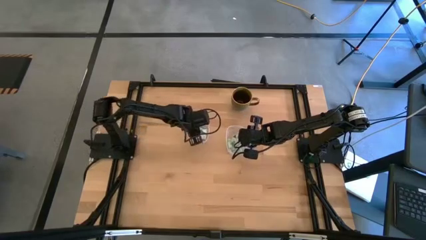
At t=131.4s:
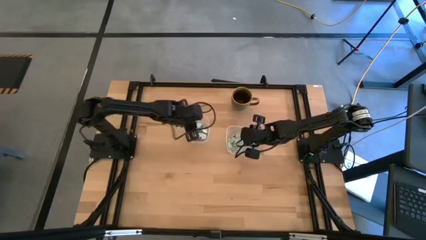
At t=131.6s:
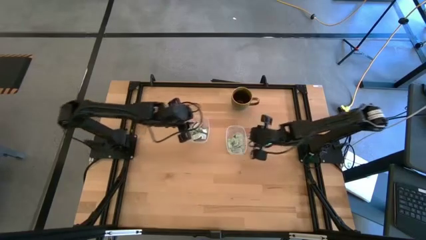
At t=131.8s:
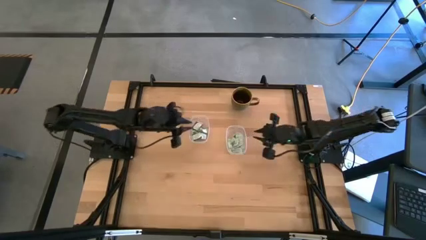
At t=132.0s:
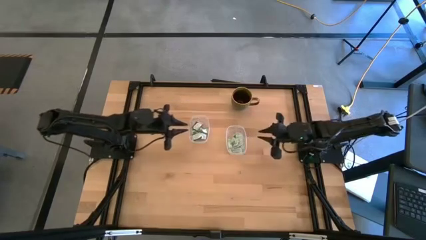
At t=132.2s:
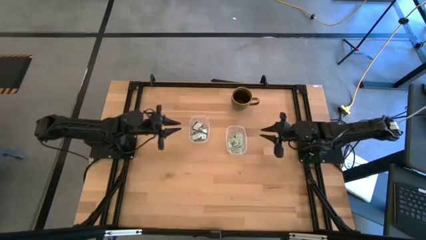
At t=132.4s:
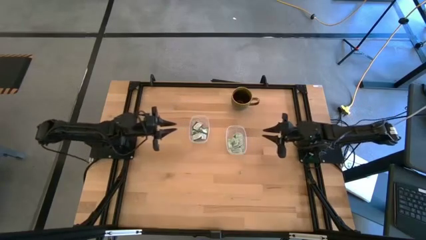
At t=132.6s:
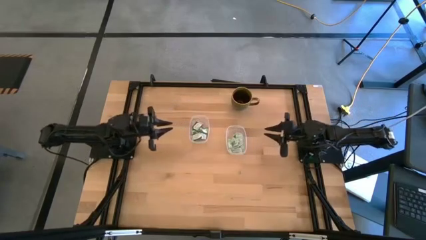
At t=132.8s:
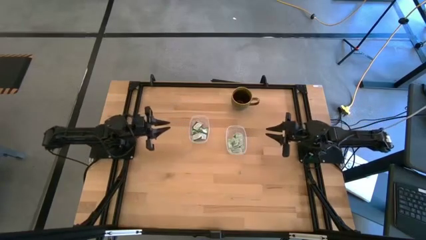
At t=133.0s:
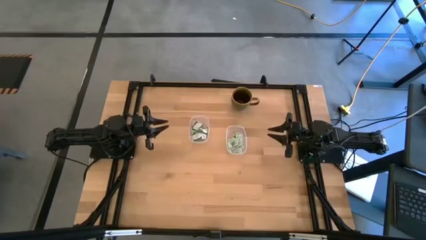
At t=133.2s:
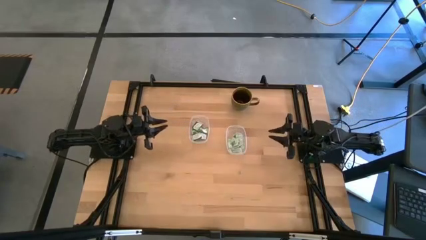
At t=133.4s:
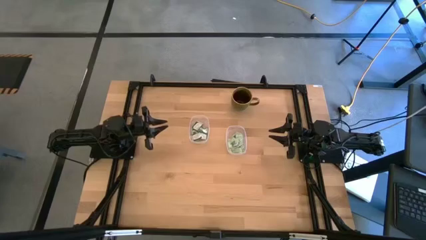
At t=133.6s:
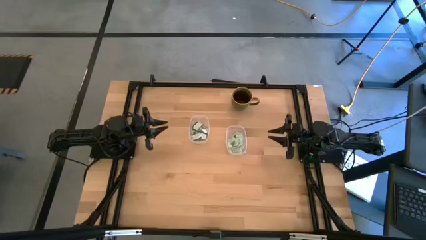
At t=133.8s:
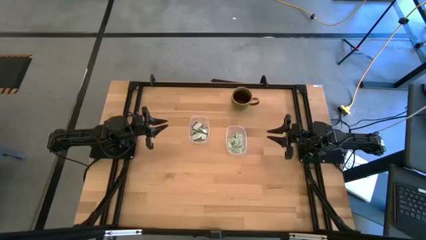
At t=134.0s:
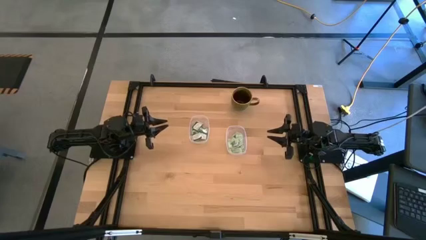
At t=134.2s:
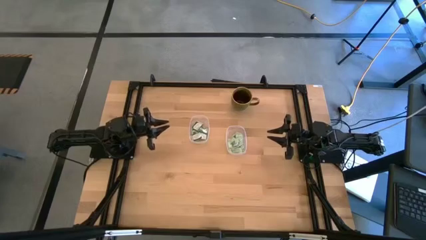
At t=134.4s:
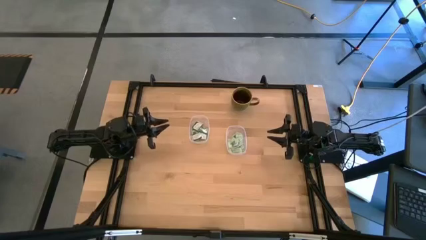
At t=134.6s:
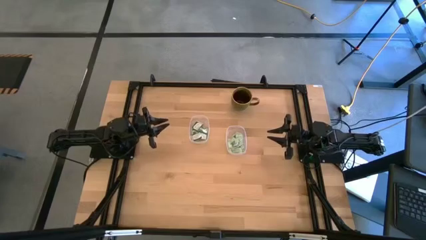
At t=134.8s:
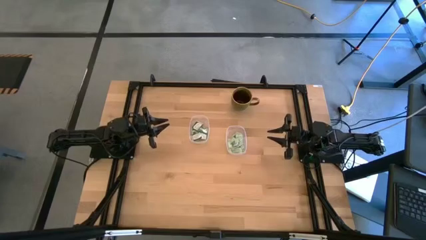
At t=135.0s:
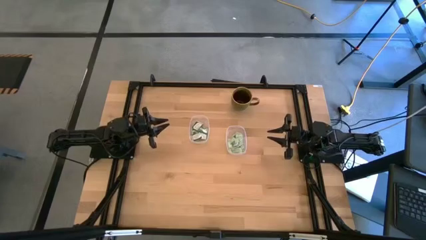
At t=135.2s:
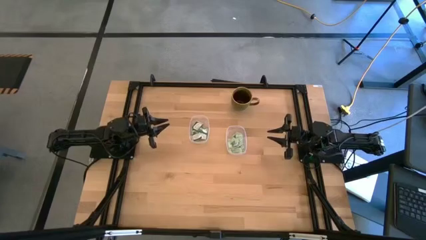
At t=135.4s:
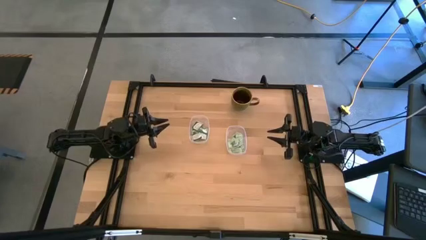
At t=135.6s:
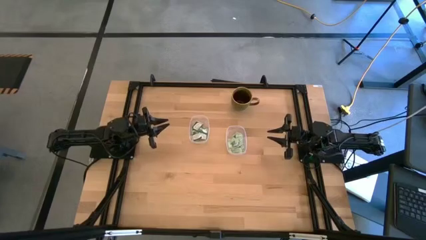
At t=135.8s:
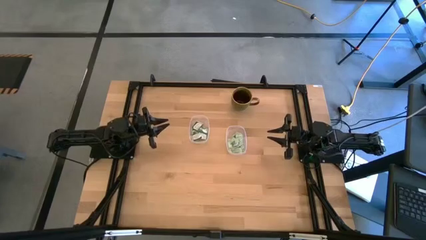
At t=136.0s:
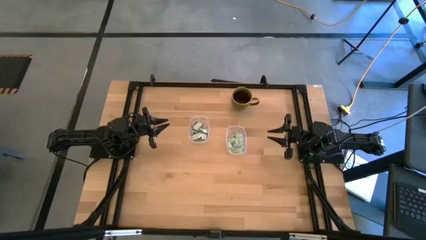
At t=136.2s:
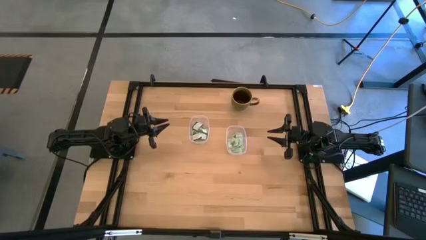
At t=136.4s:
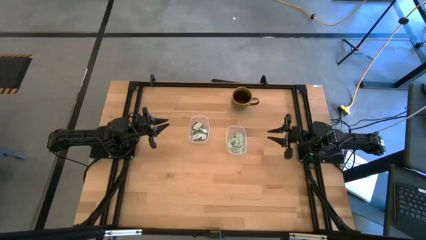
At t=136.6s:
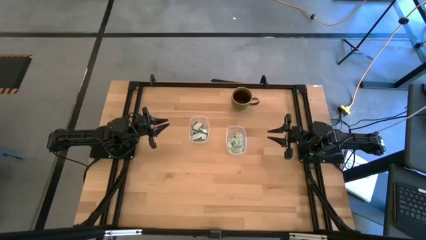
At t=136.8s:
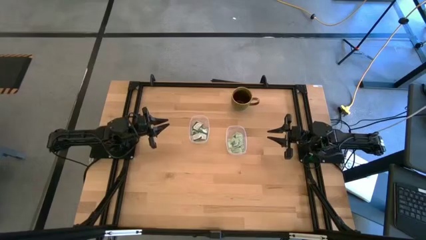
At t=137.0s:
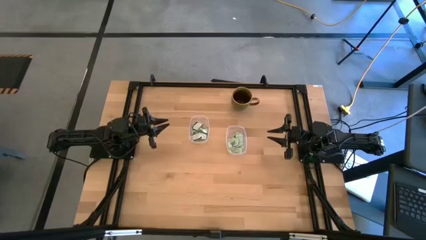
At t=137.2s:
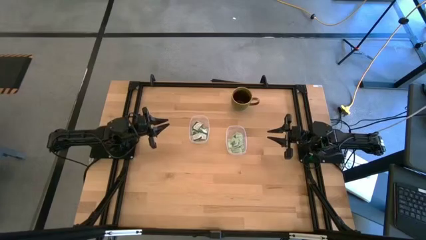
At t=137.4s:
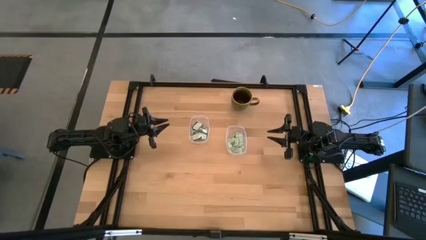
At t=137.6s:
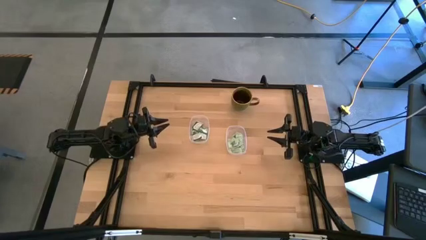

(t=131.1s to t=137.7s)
Task: Pick and place items into bin
Return to Home Position

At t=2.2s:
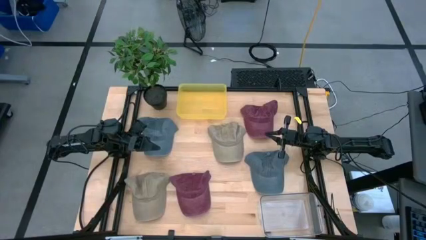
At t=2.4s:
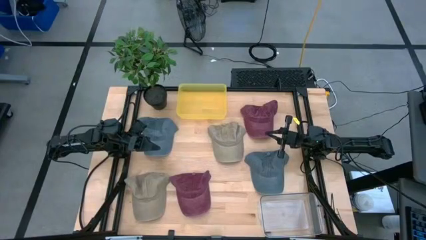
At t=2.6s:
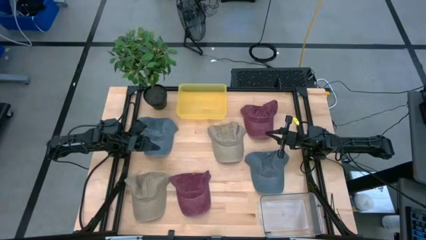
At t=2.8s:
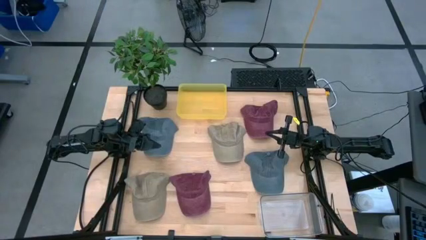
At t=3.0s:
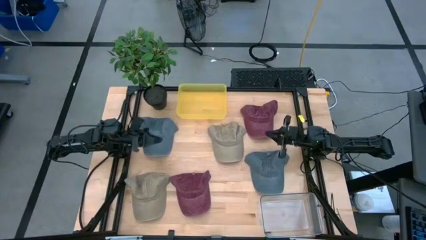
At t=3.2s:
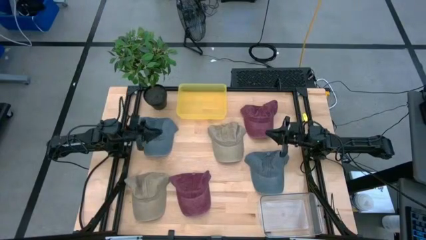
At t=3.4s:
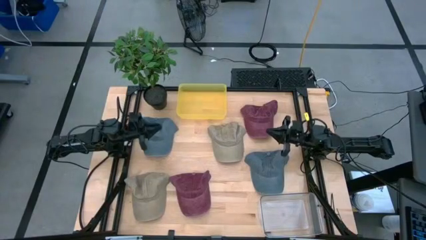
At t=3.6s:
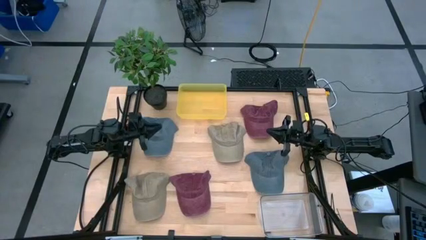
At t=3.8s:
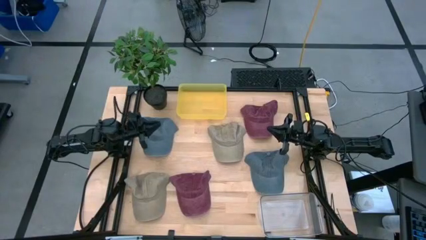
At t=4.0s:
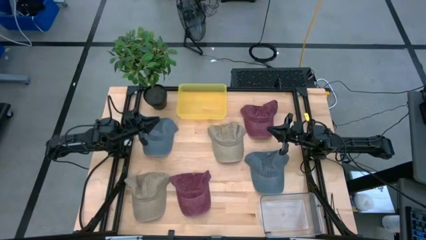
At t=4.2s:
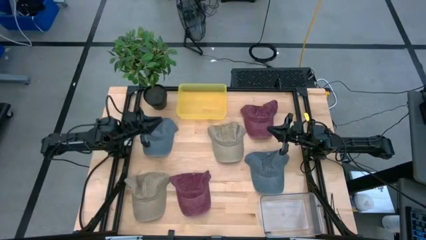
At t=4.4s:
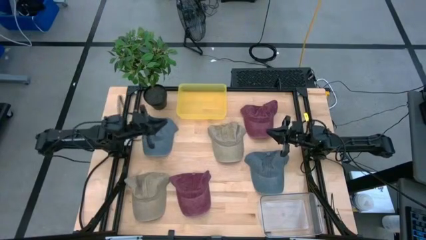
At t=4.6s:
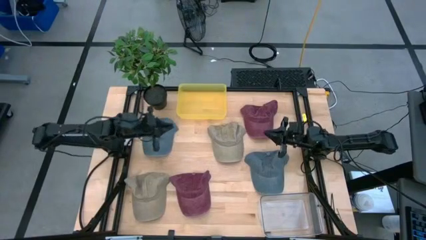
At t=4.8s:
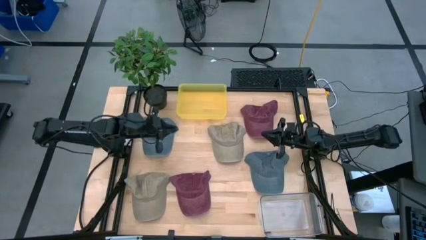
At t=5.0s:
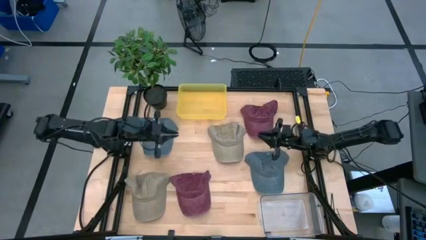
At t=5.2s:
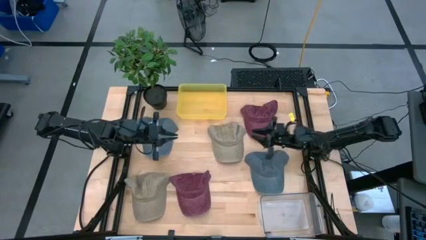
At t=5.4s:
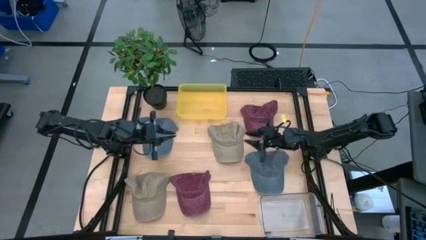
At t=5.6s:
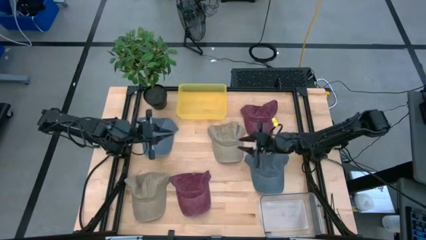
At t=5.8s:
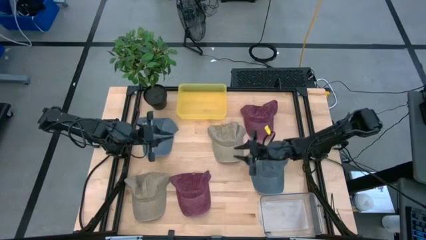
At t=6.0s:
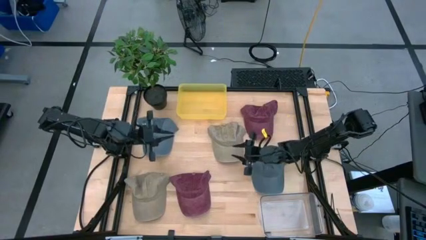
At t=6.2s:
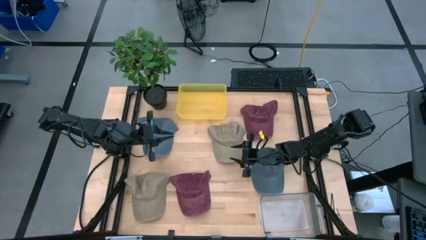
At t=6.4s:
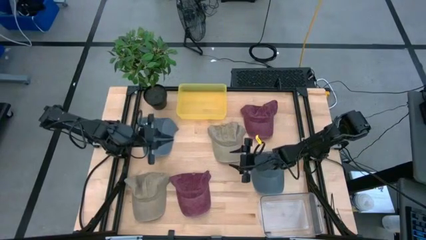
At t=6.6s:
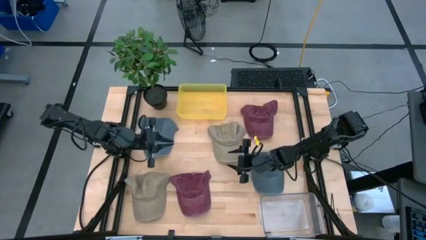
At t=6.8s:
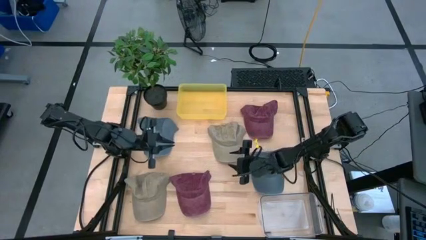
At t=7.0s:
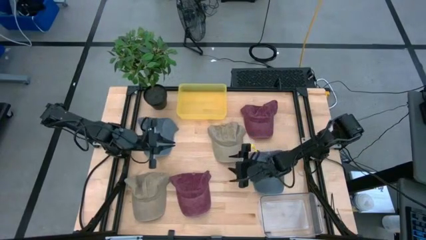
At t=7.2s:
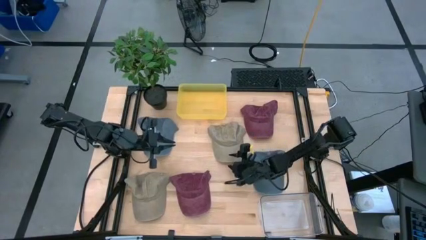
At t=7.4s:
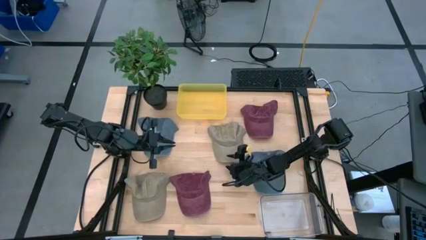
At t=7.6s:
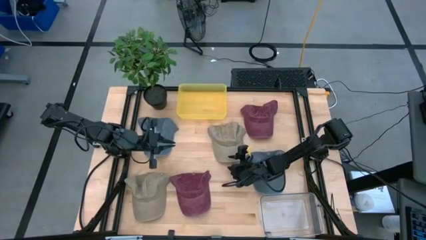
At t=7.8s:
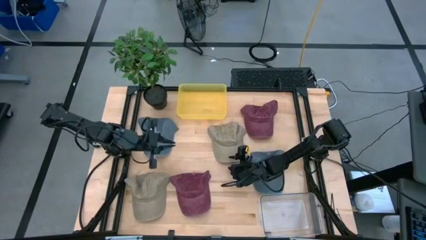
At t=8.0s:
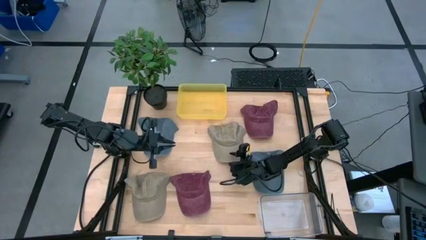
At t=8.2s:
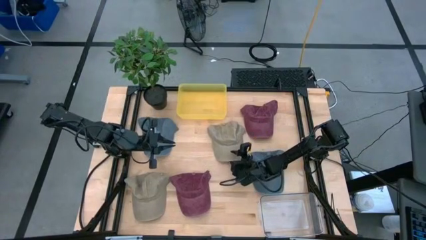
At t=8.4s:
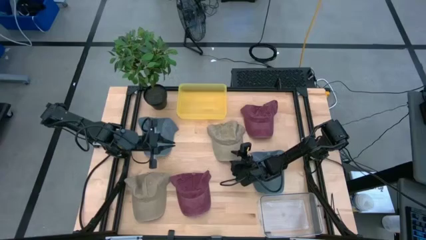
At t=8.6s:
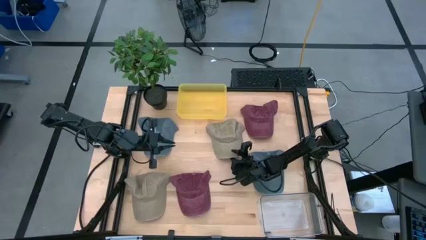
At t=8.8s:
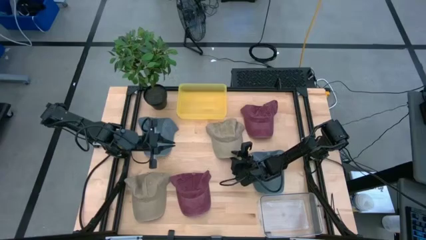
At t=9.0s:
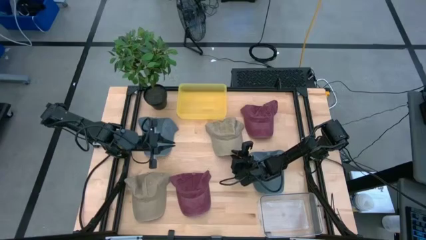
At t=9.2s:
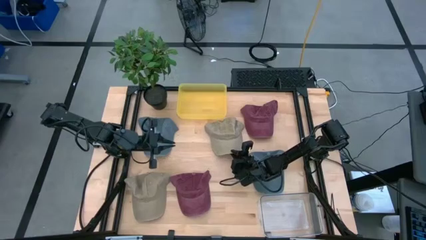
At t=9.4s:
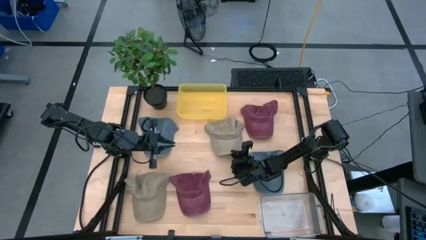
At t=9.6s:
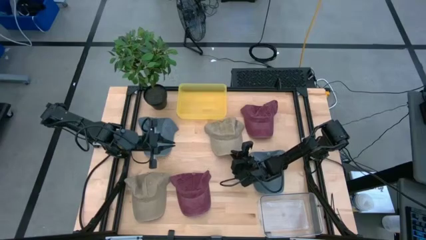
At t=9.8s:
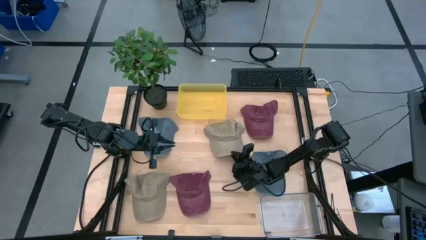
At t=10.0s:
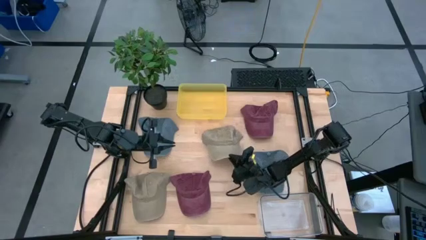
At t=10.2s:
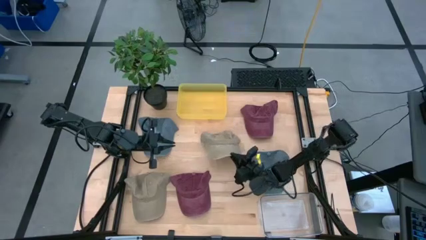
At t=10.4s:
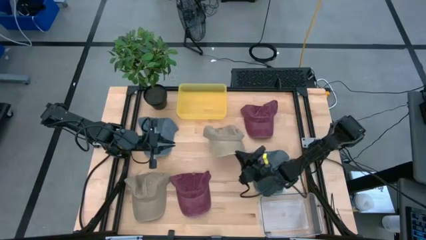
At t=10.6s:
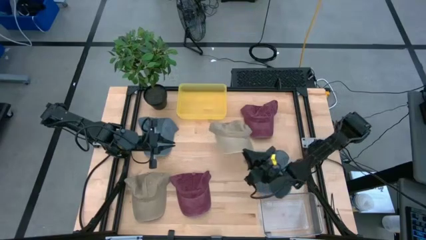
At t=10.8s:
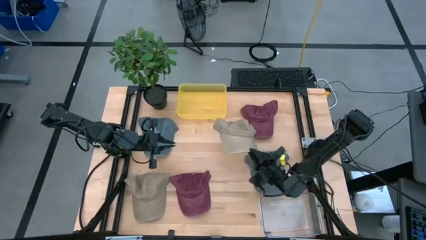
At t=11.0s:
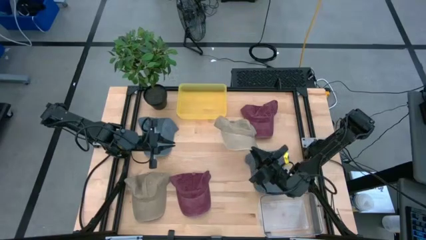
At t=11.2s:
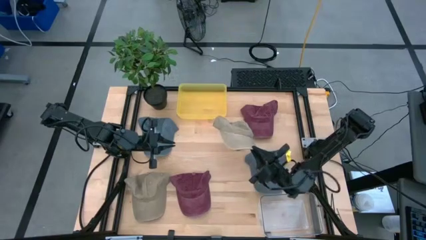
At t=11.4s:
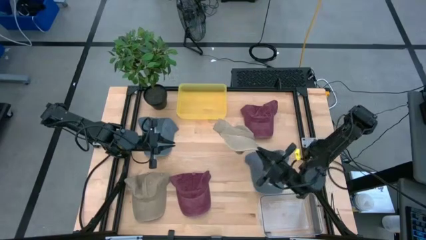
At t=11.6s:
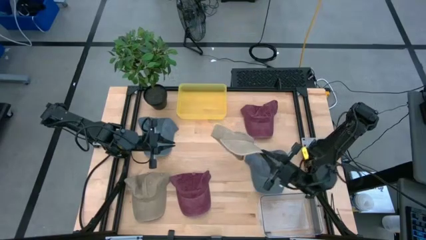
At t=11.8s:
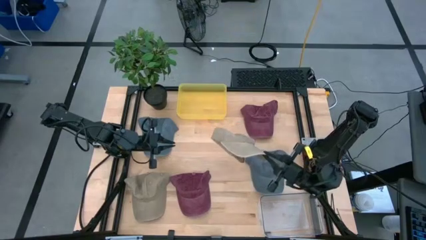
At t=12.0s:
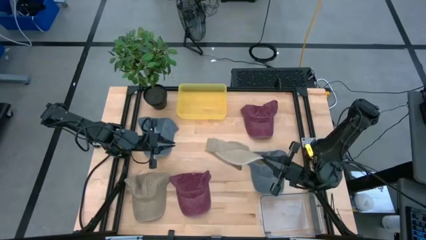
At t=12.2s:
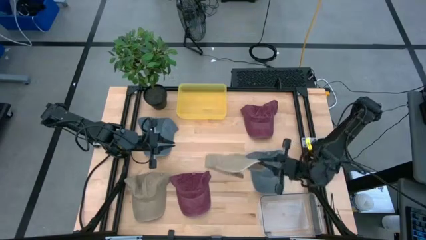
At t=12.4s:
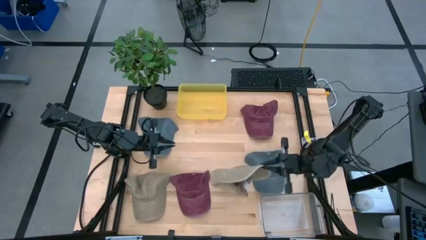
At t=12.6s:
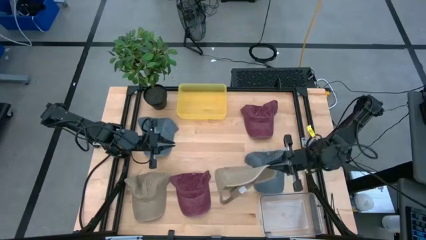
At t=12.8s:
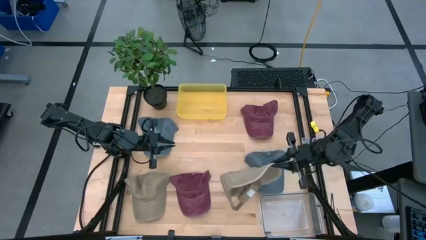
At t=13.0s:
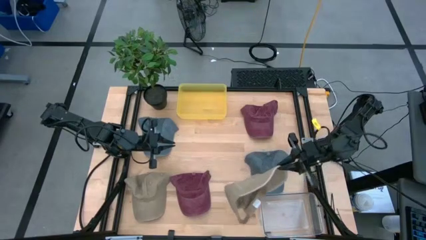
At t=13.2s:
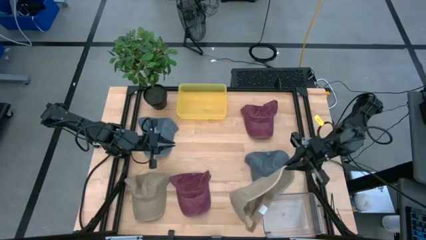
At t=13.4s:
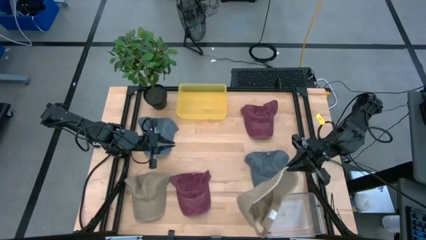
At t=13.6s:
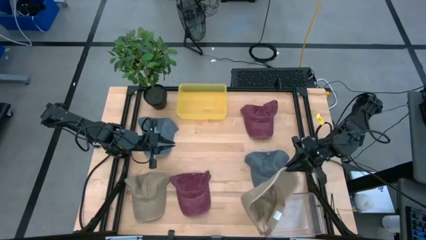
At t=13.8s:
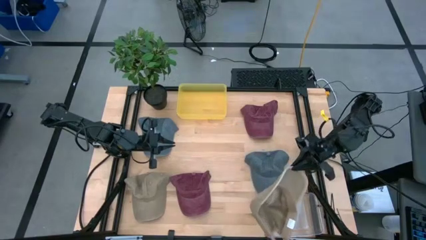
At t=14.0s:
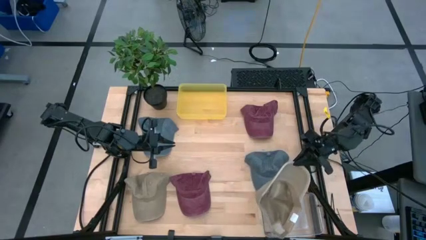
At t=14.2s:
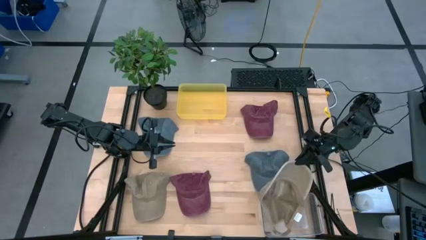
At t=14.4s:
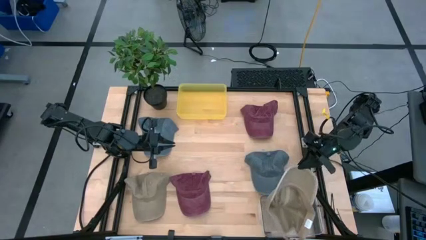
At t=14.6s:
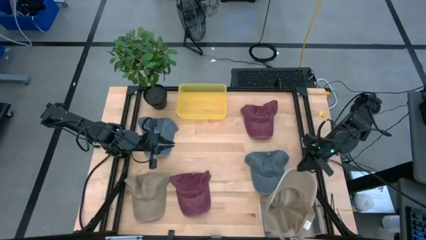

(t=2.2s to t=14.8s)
Task: Pick & Place hat
Put the top brown cap into the transparent bin
